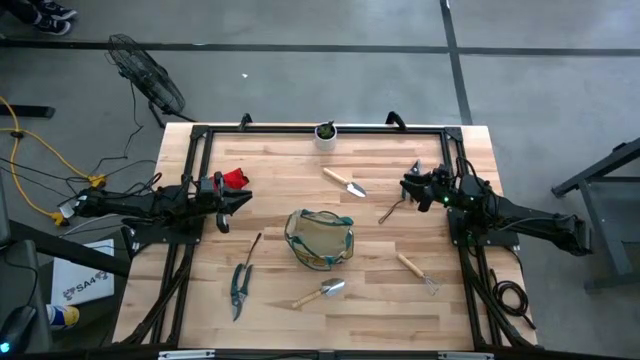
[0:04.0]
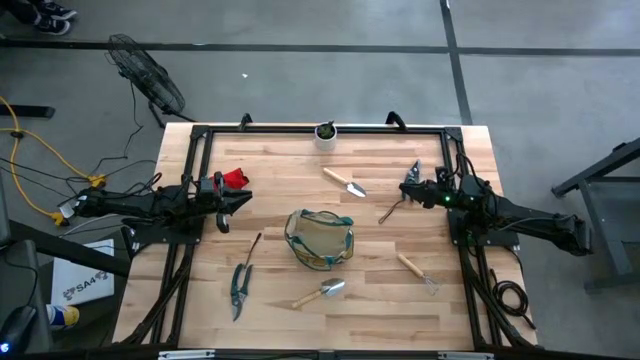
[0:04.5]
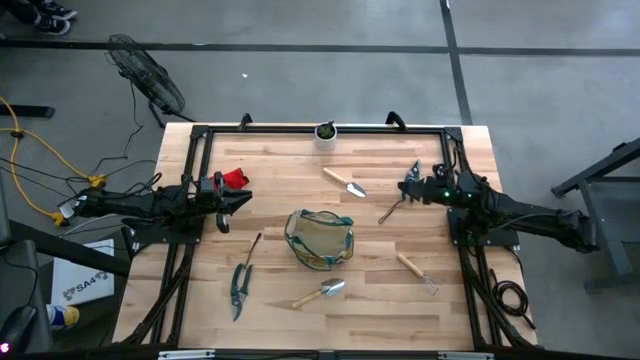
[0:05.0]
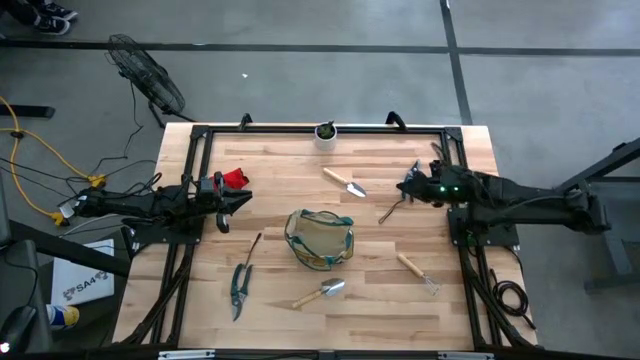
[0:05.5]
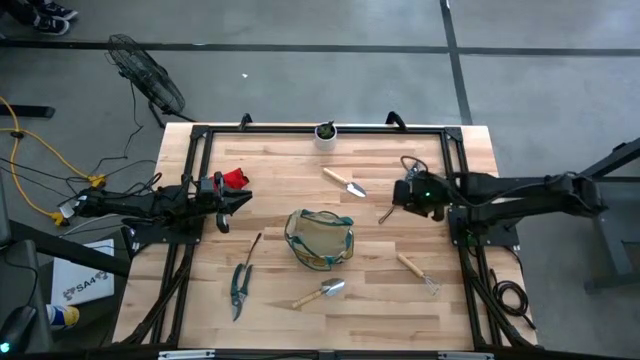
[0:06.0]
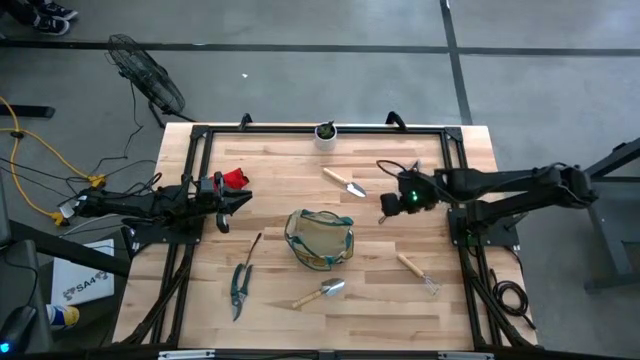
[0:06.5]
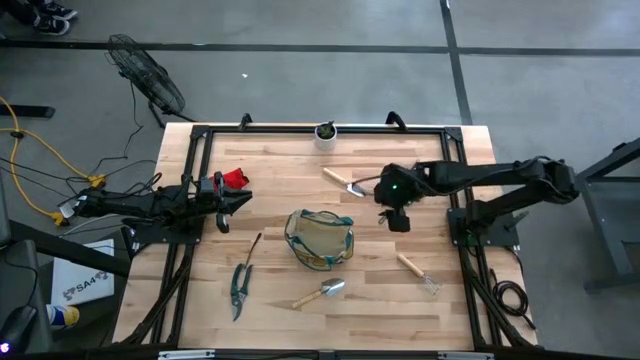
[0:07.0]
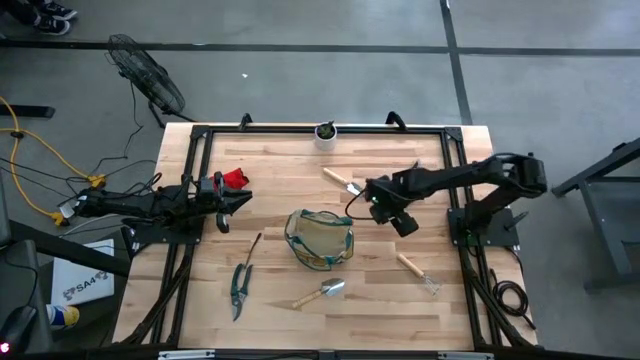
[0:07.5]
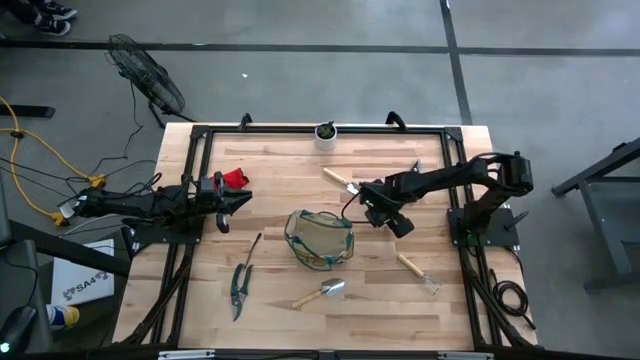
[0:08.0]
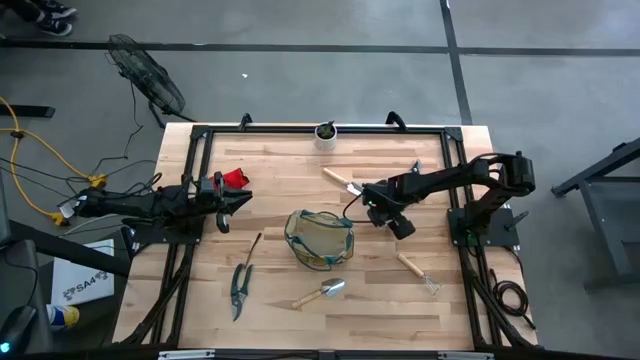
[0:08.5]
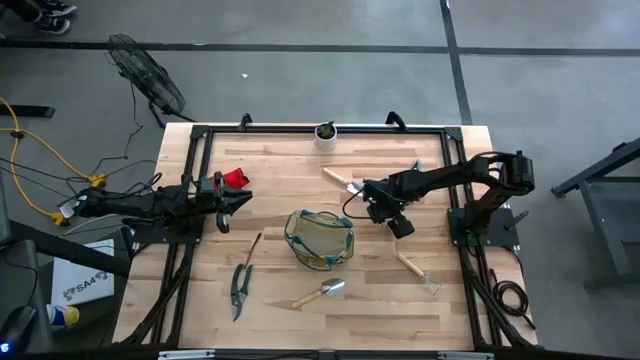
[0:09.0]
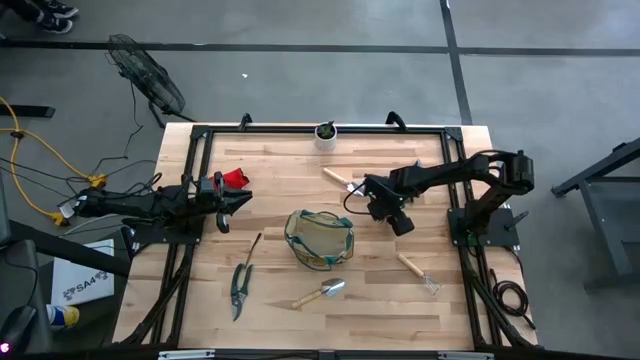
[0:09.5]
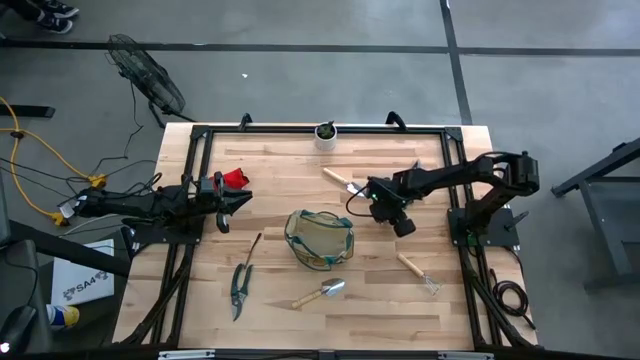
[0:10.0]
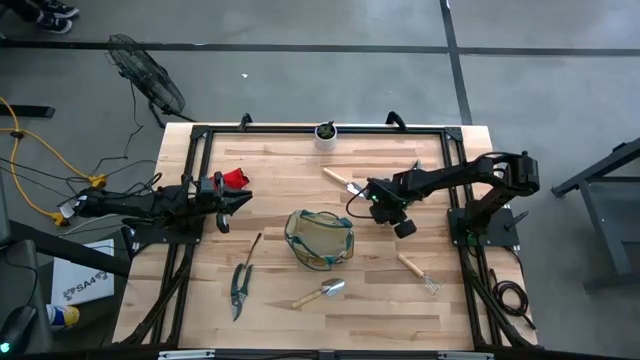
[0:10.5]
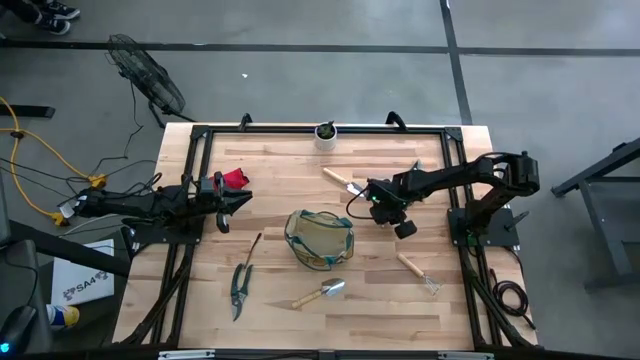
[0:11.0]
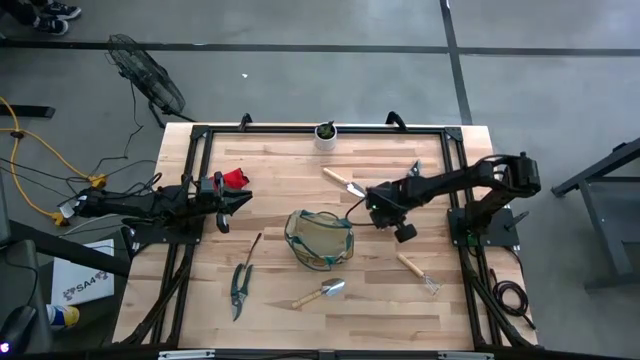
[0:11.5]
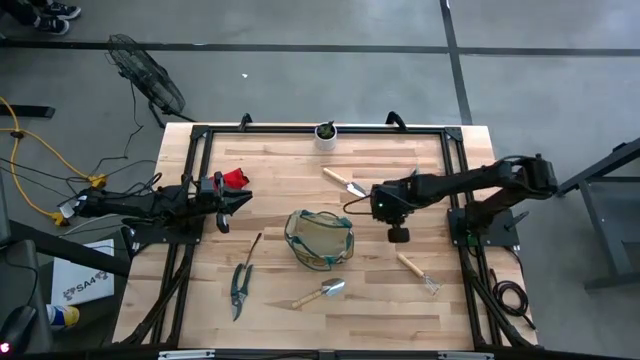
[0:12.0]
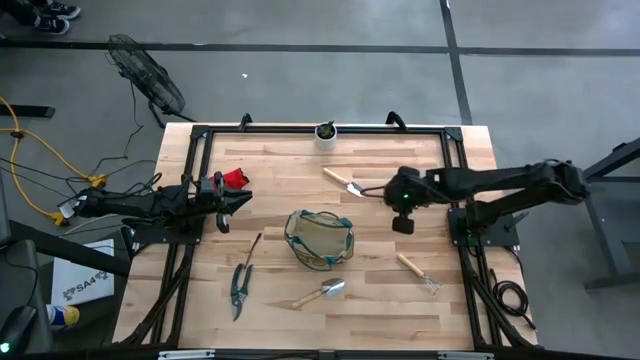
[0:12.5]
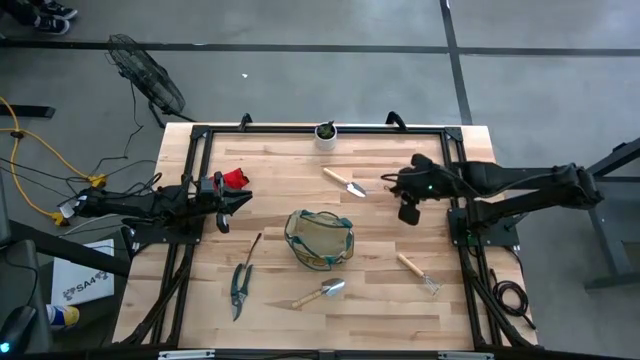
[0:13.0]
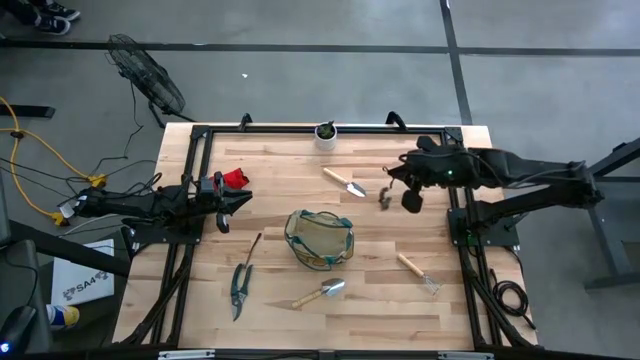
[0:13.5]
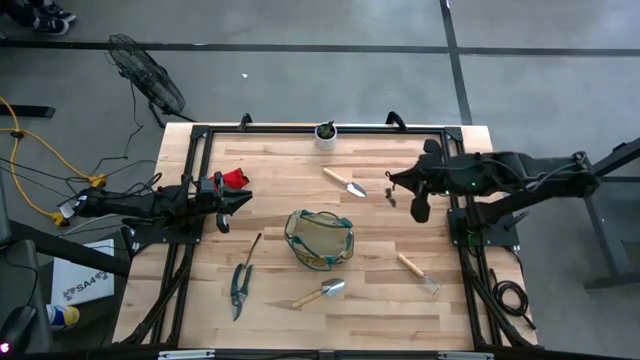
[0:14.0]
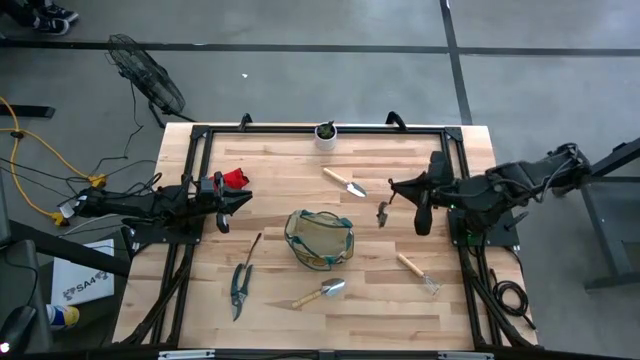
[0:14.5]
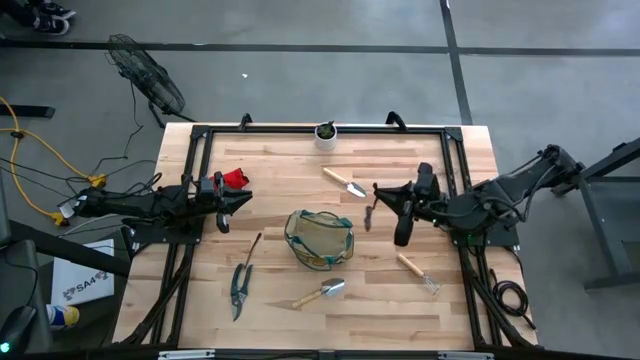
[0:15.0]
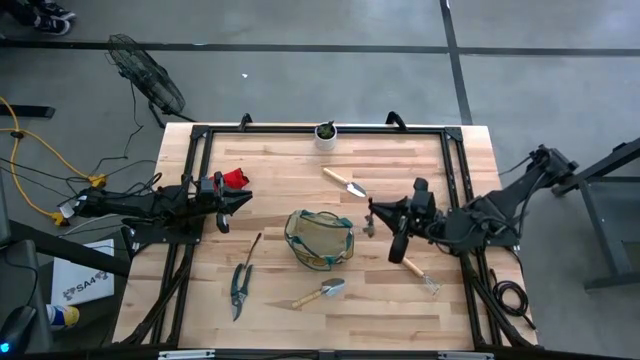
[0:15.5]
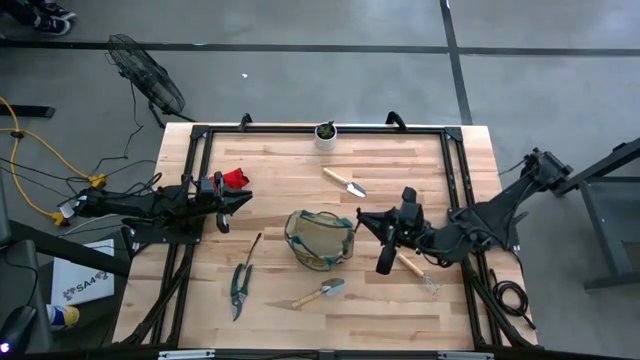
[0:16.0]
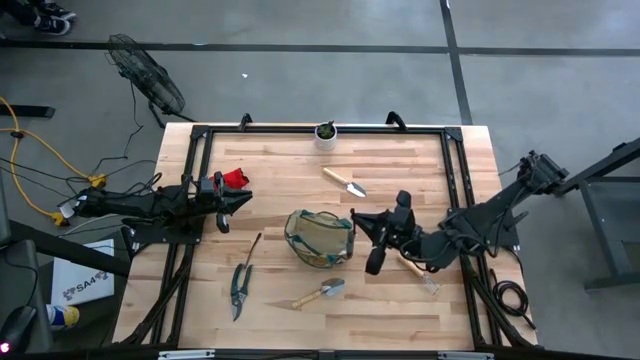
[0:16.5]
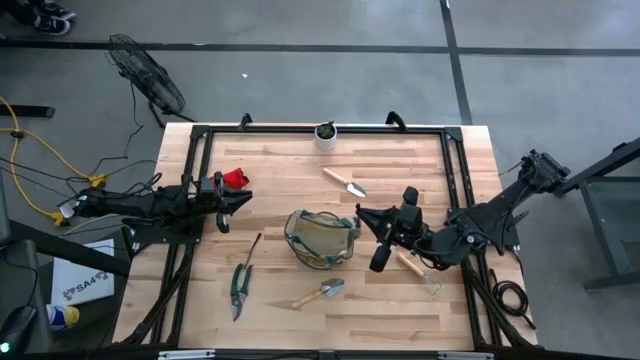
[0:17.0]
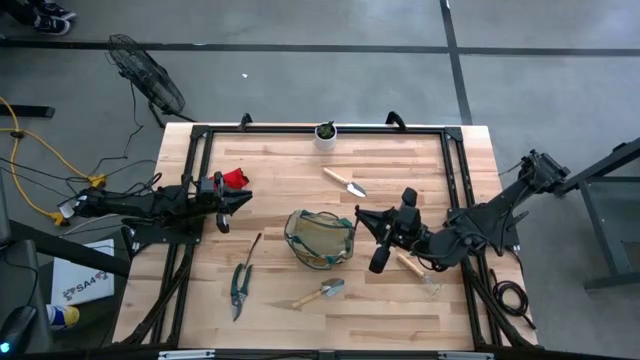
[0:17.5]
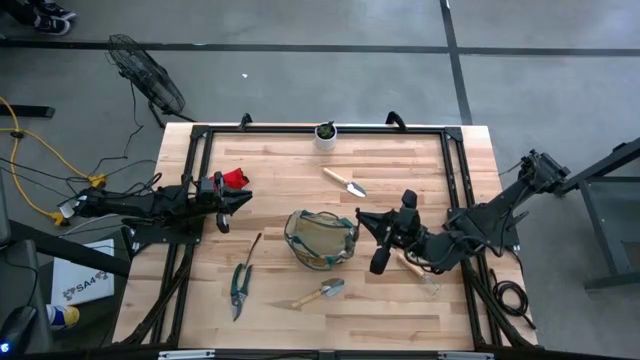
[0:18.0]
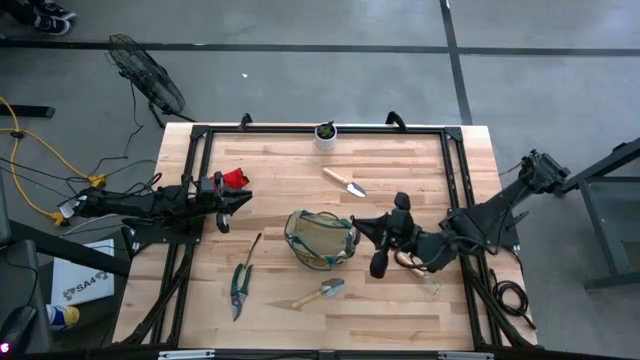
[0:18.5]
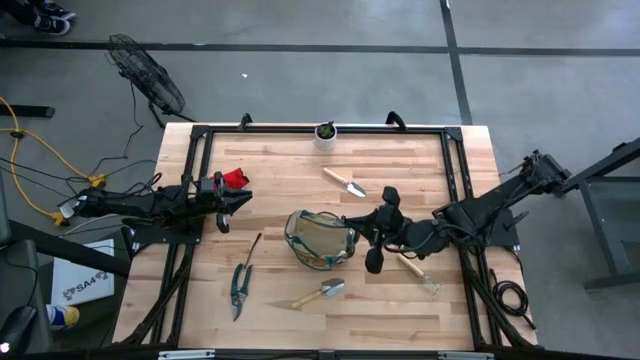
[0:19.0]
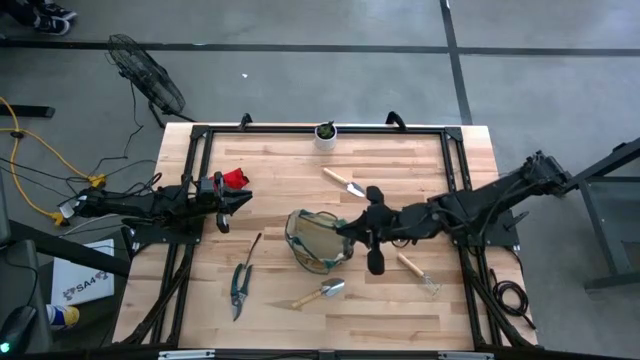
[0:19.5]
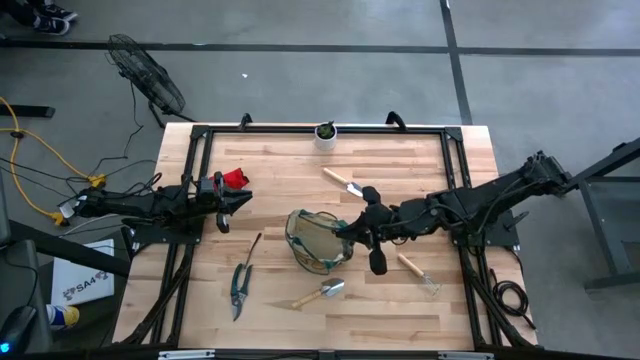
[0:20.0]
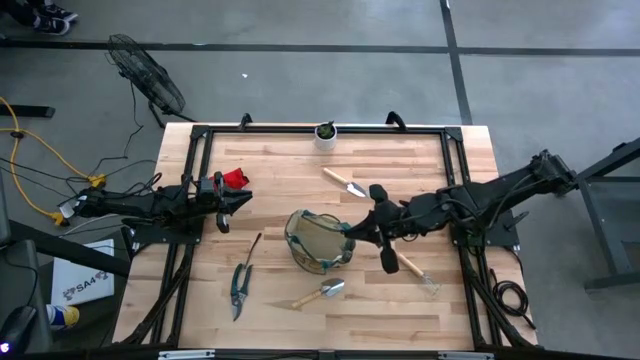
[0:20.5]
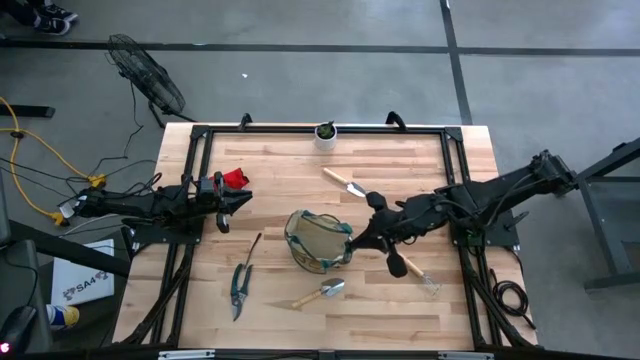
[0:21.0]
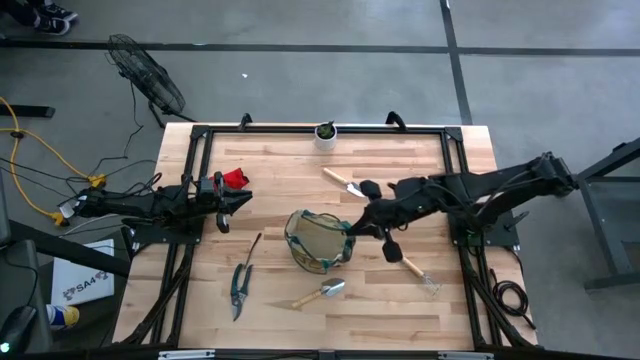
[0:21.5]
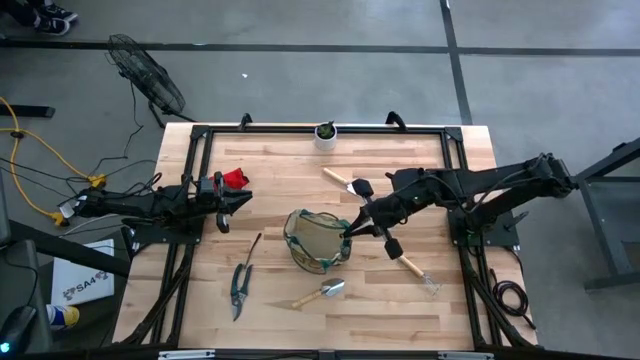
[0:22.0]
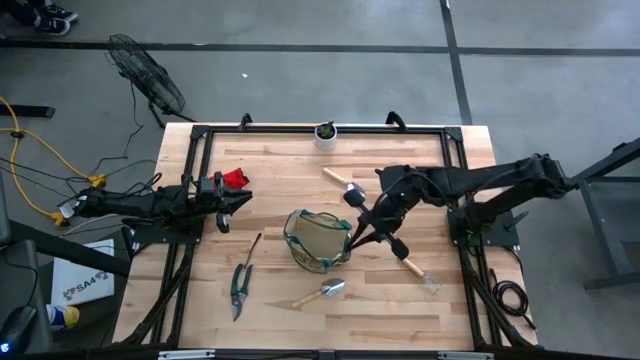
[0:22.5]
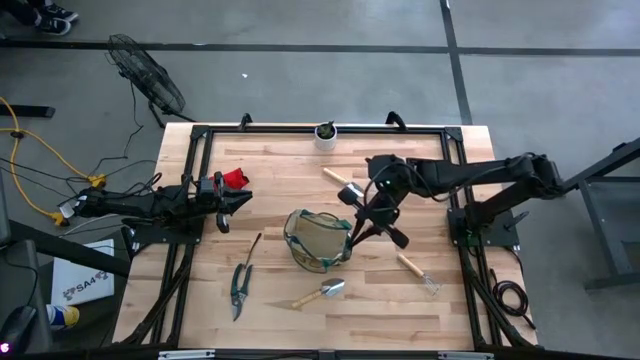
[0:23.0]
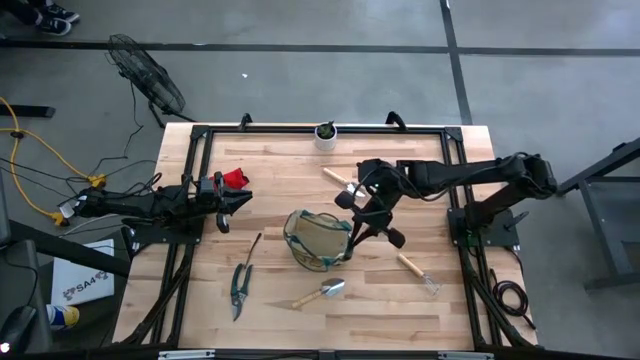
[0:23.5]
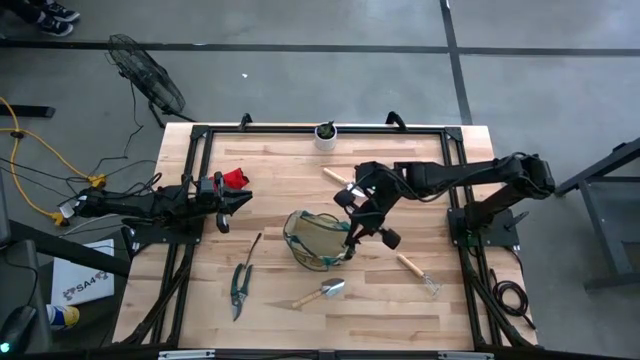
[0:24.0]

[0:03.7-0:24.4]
Task: Pick & Place Garden tools in Gardening bag
Put the green shear scissors into the gardening bag
